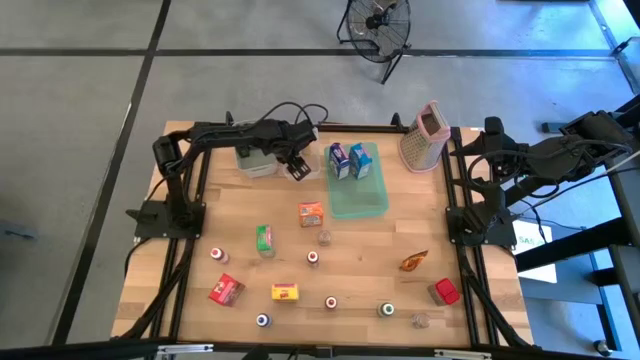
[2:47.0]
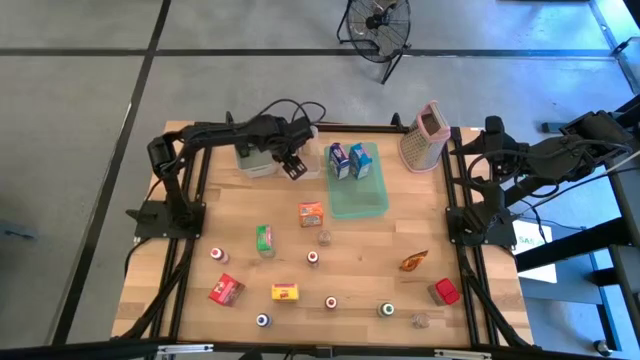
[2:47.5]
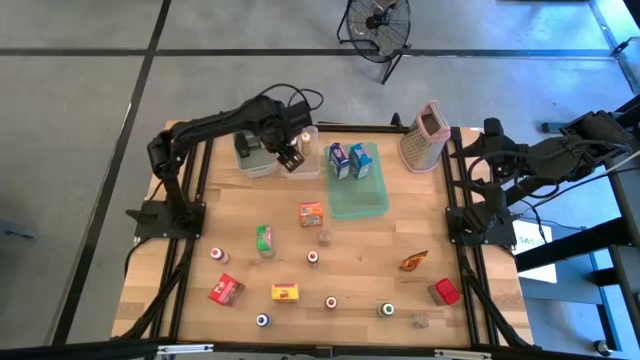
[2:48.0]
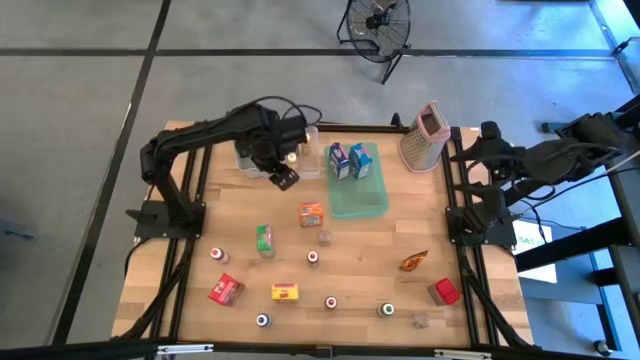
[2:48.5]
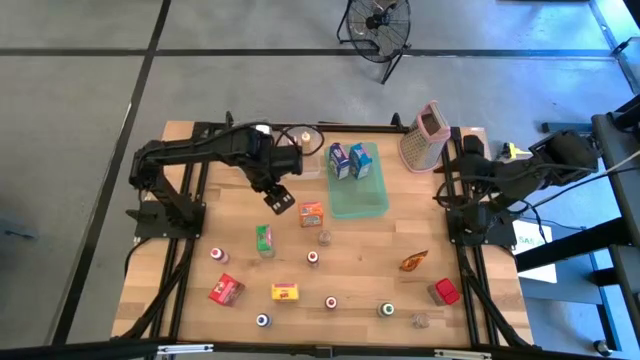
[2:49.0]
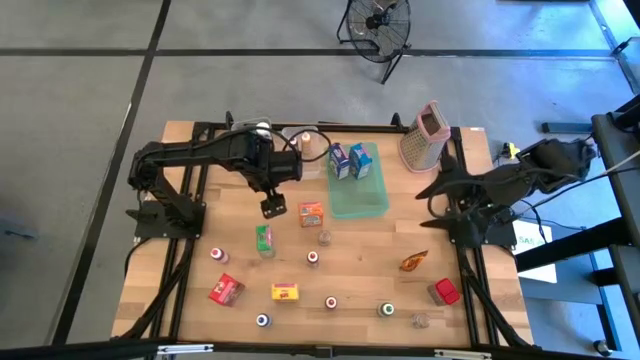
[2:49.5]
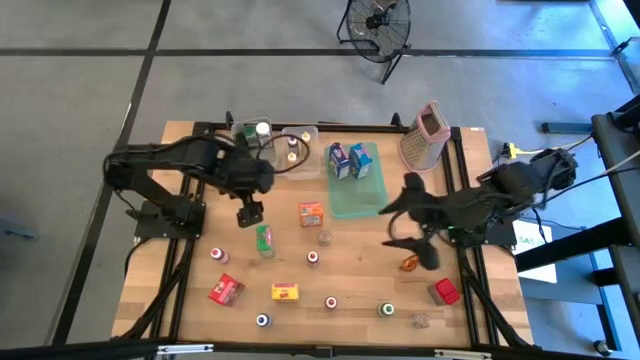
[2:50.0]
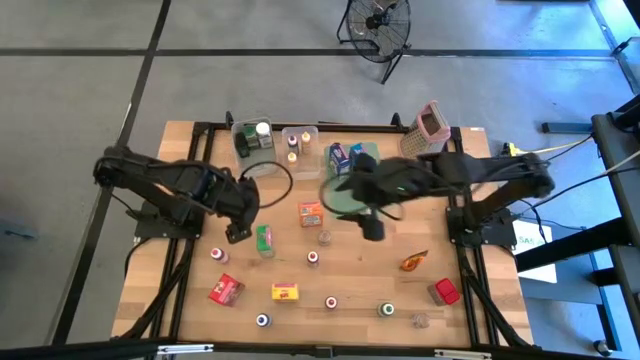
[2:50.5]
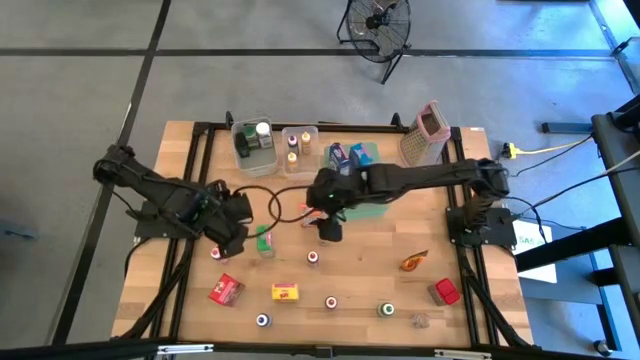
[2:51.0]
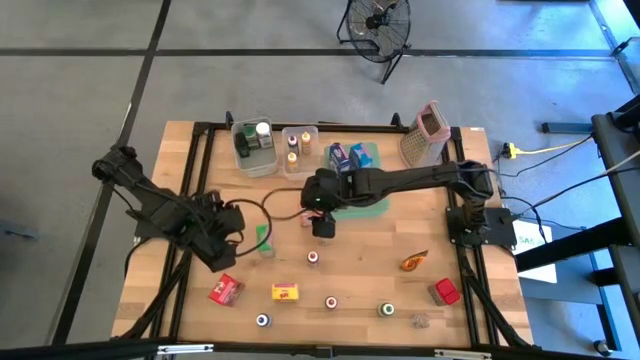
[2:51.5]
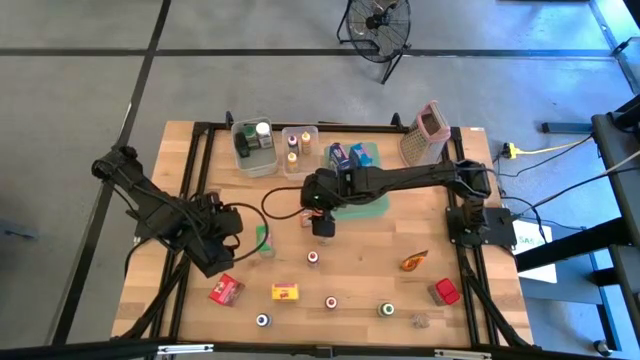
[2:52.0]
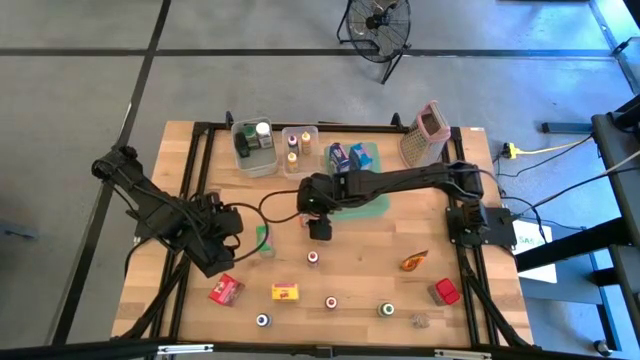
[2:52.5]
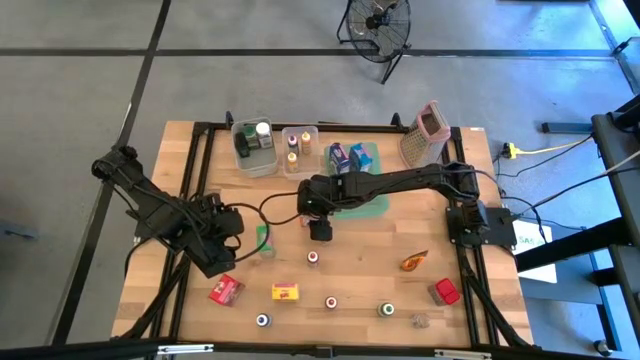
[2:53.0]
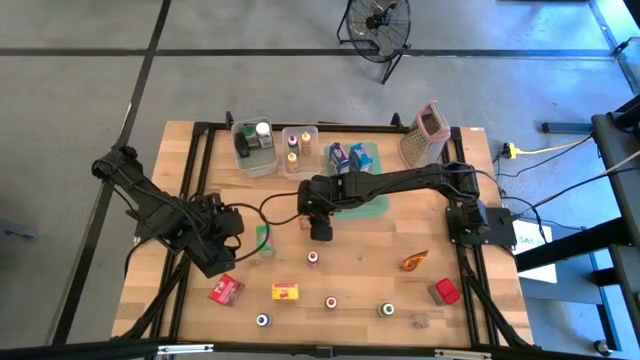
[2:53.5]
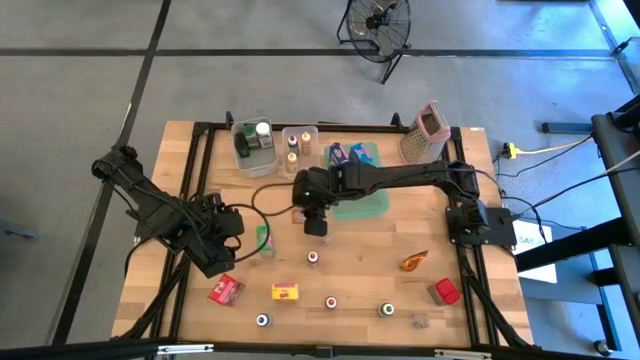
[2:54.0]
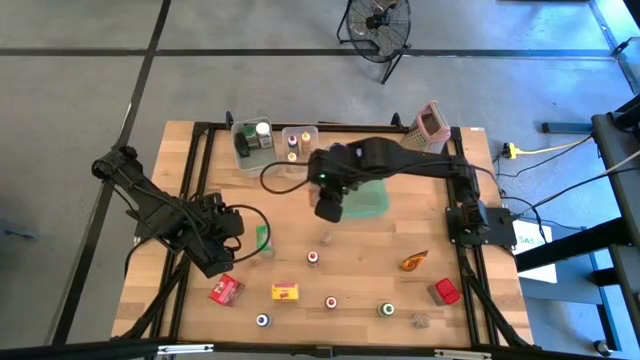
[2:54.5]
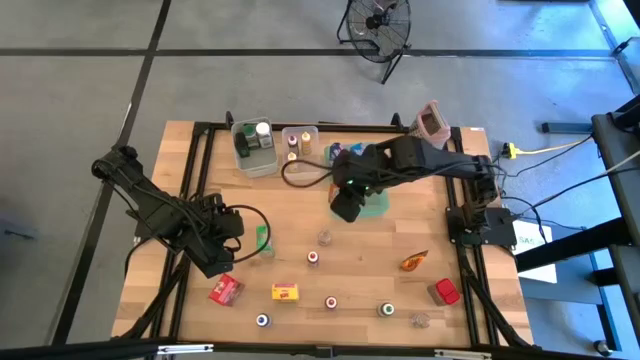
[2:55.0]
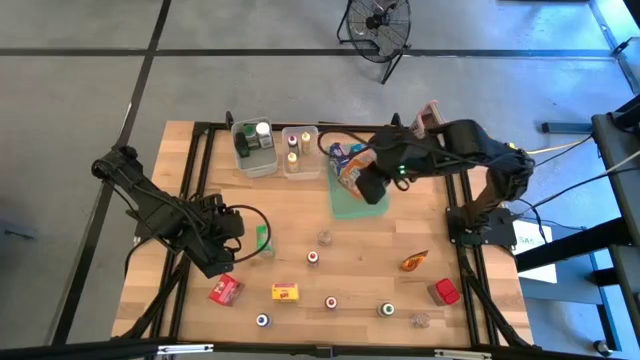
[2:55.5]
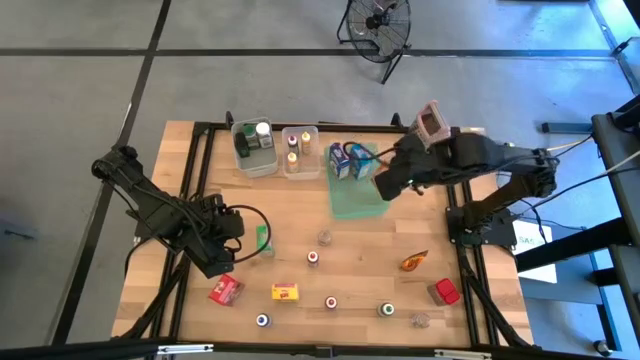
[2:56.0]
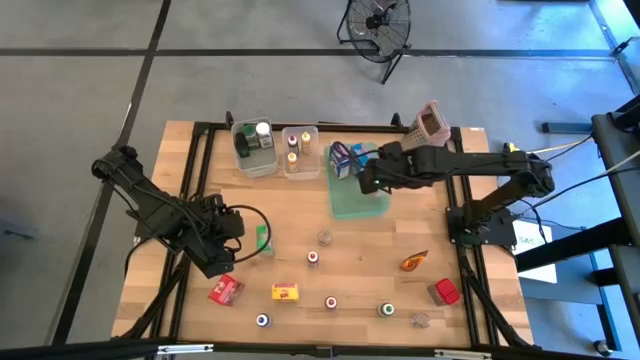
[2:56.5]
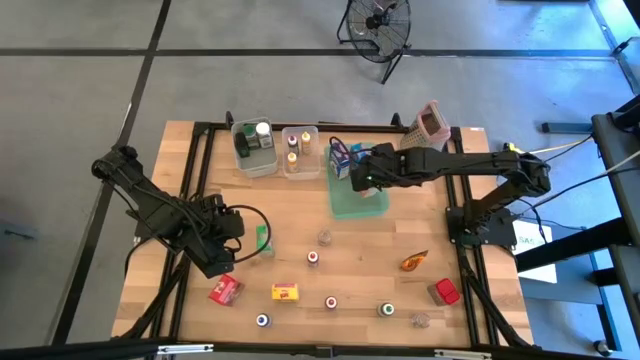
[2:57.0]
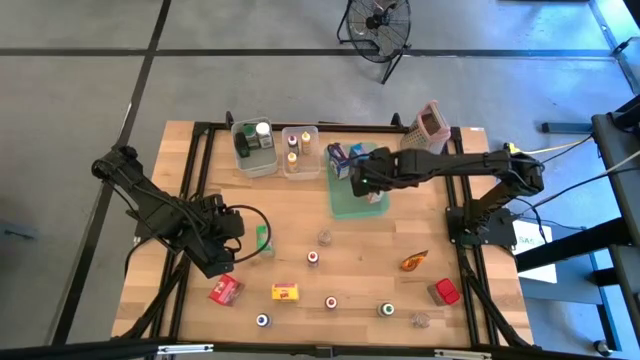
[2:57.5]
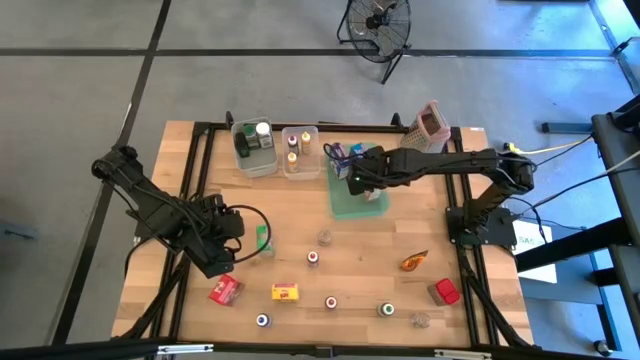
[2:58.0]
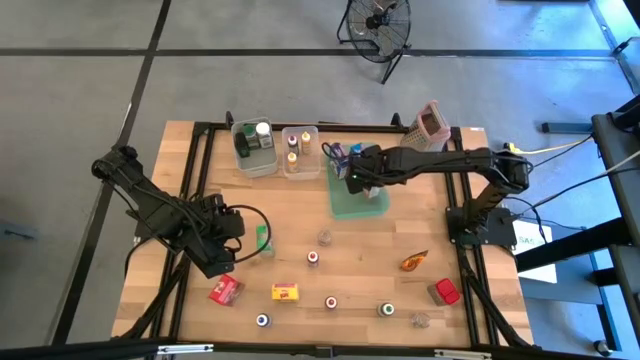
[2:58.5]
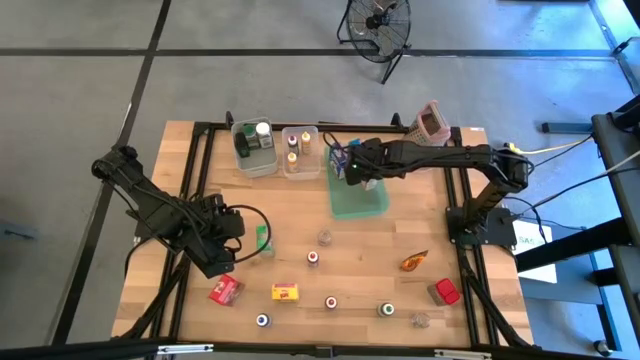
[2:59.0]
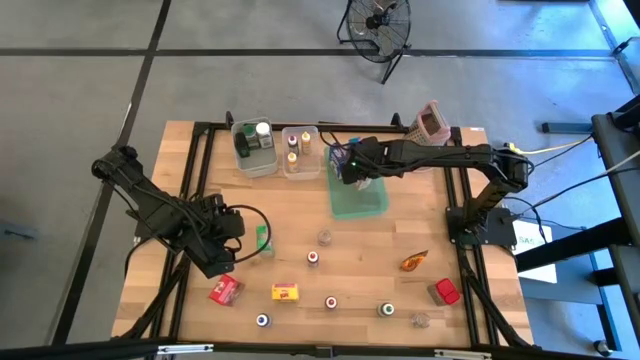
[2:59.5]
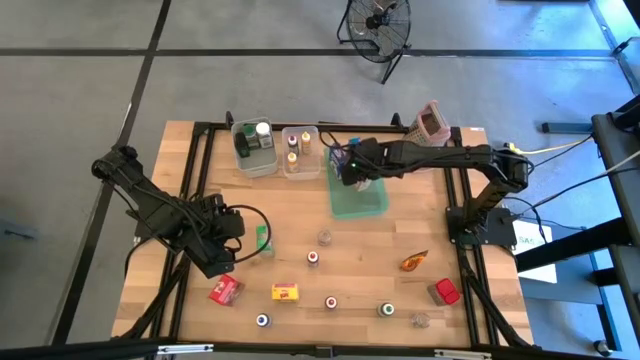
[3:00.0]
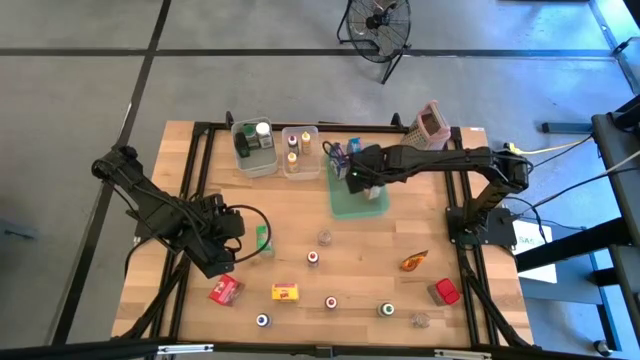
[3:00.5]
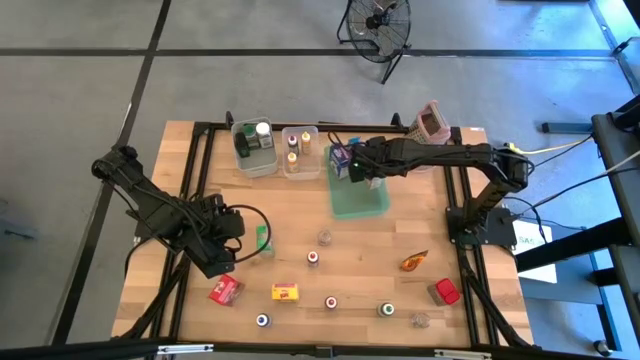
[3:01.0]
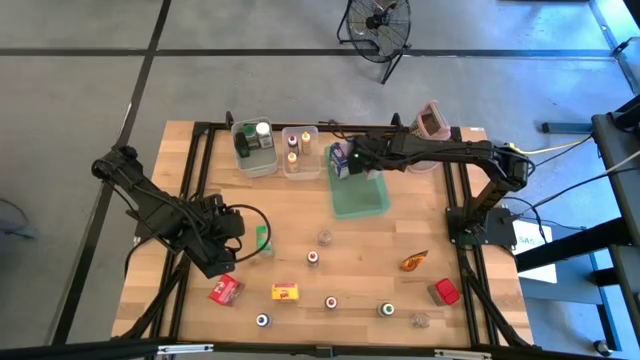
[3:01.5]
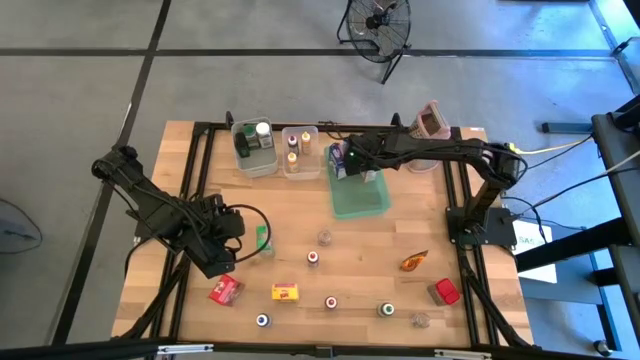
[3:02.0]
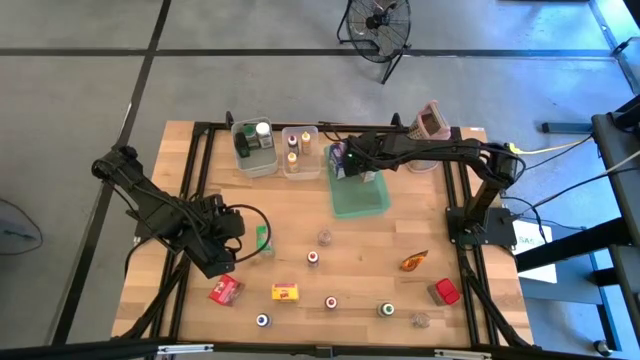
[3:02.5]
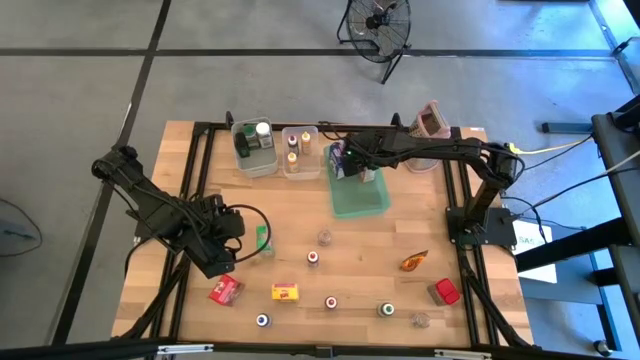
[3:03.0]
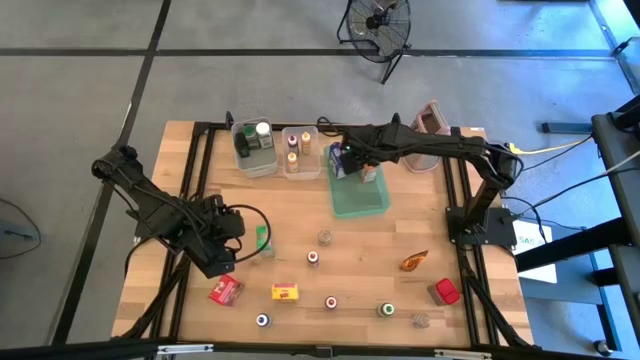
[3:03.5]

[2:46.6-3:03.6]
Task: Pick & Place Kitchen Items
Put the orange cereal box into the blue bin

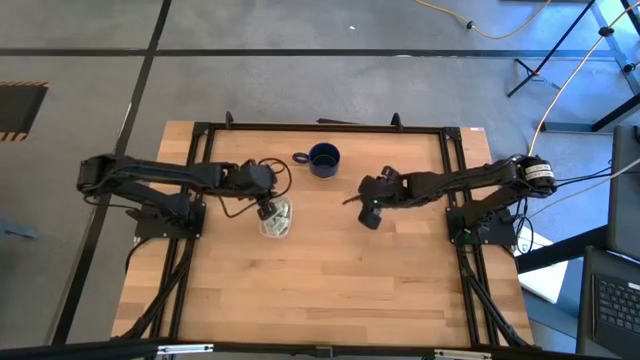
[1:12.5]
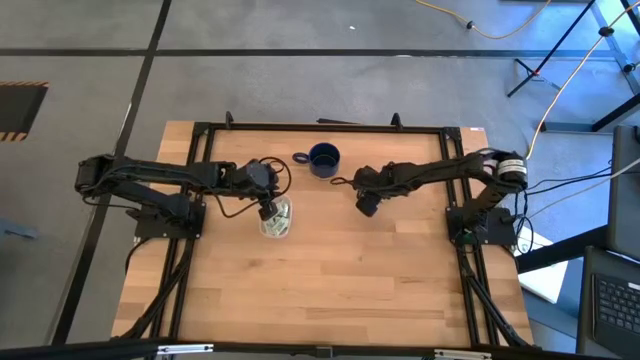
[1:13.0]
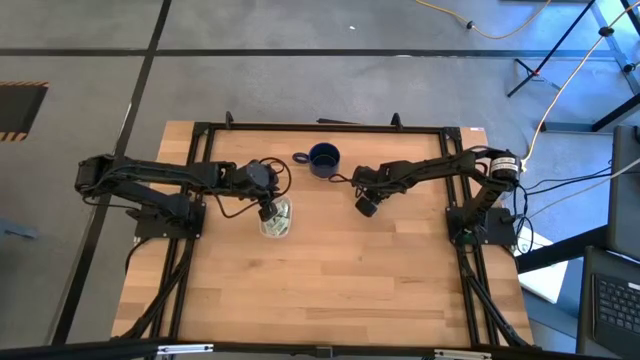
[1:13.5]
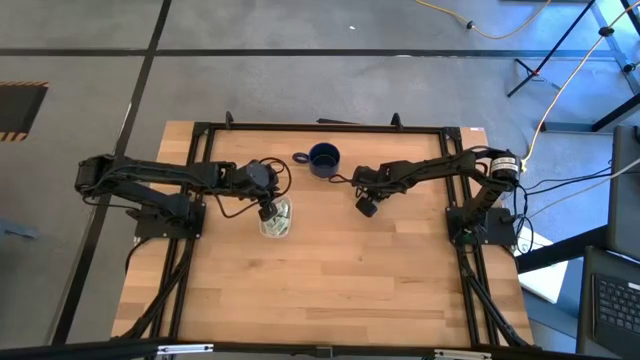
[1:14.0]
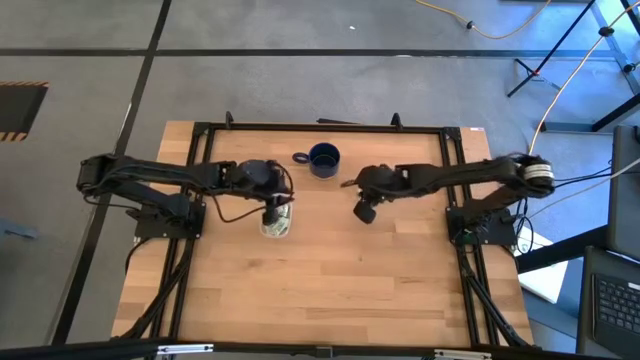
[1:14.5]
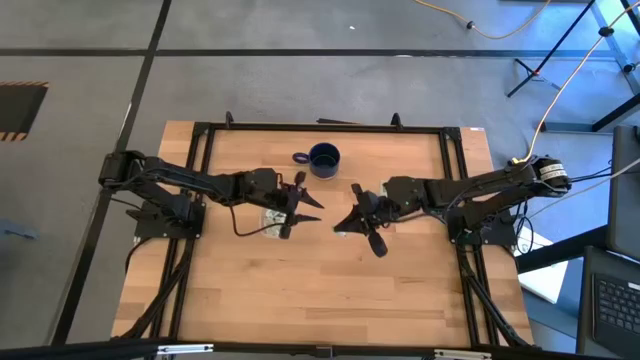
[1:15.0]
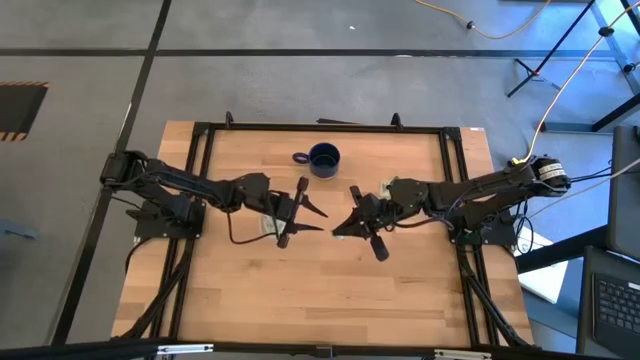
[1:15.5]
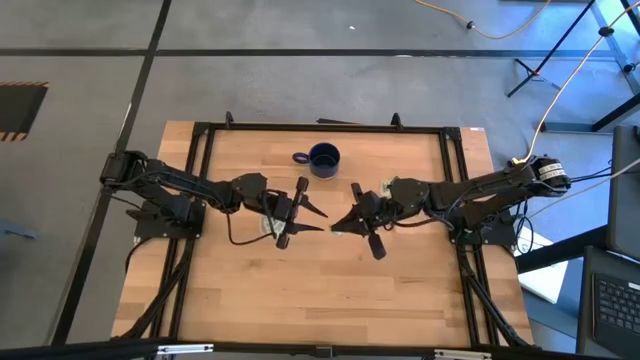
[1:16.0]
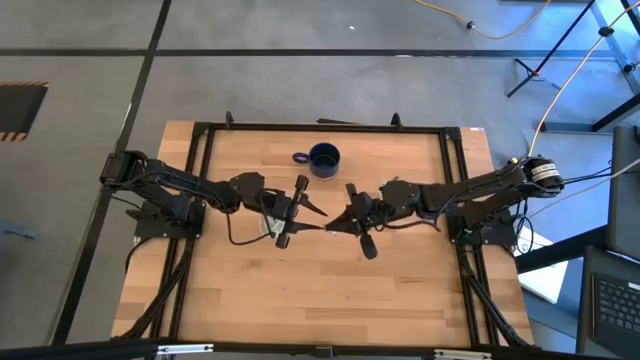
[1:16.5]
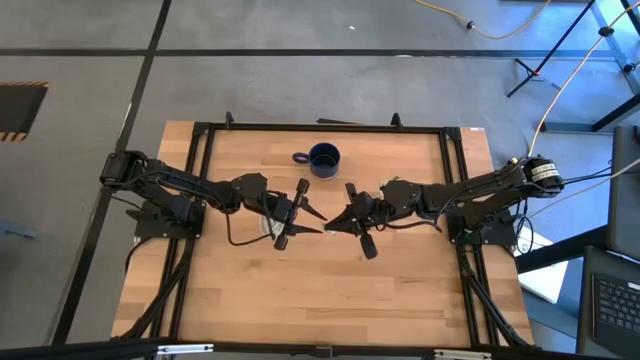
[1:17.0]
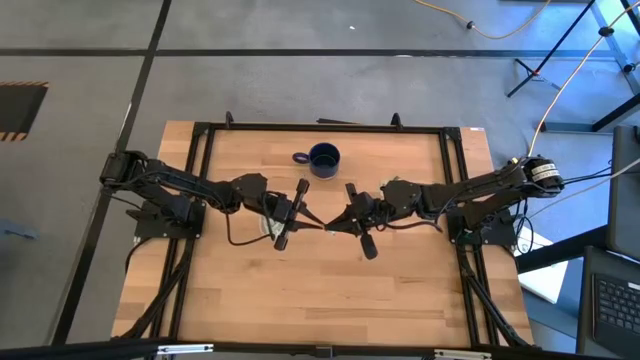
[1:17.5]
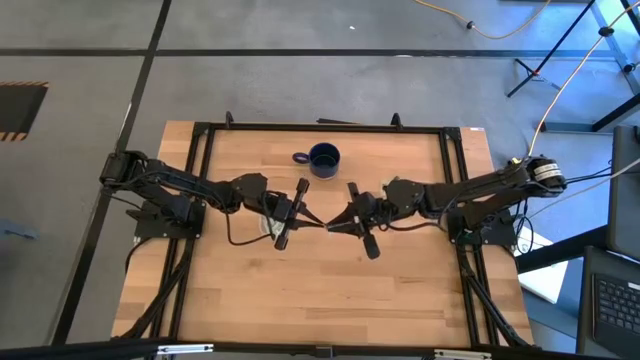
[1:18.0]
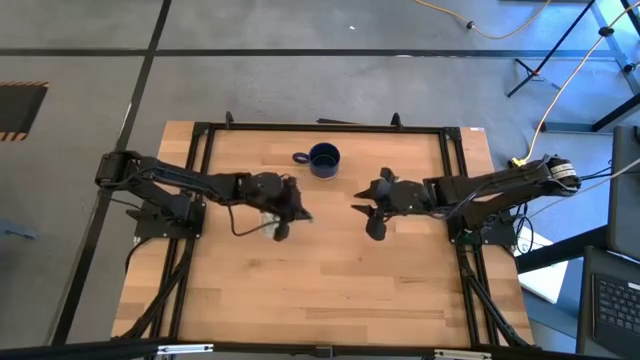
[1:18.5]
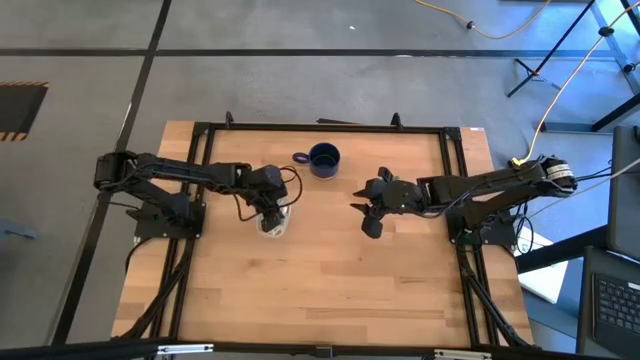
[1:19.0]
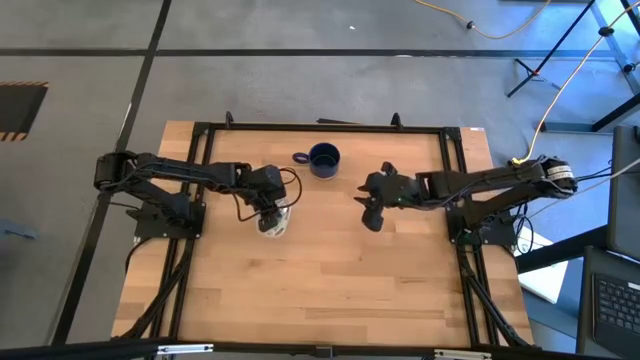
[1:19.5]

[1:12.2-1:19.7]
Task: Pick and place Stevia / Truvia into bins
Put the bottom white stevia packet into the transparent container
